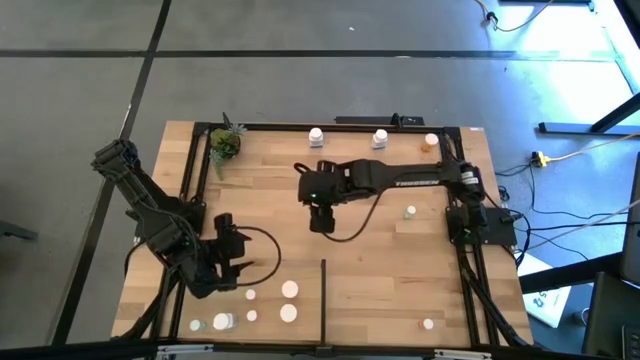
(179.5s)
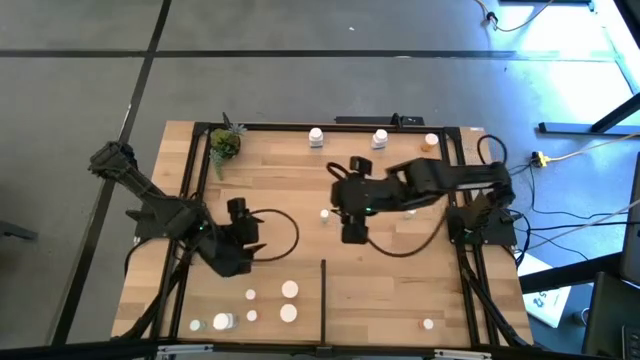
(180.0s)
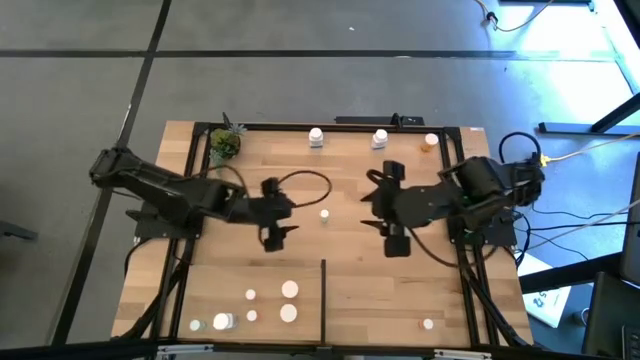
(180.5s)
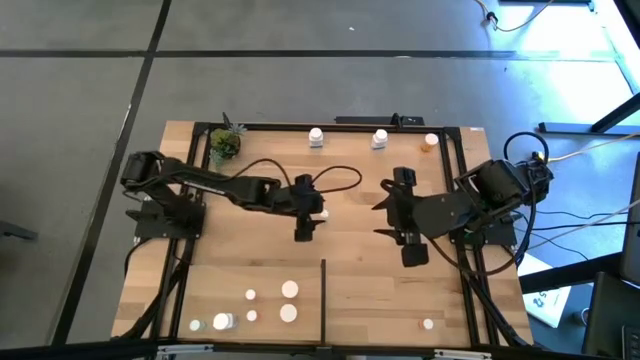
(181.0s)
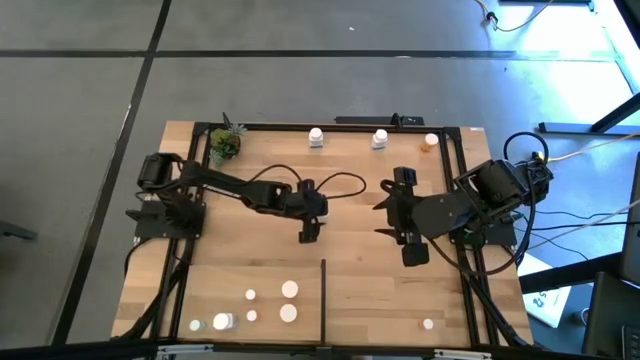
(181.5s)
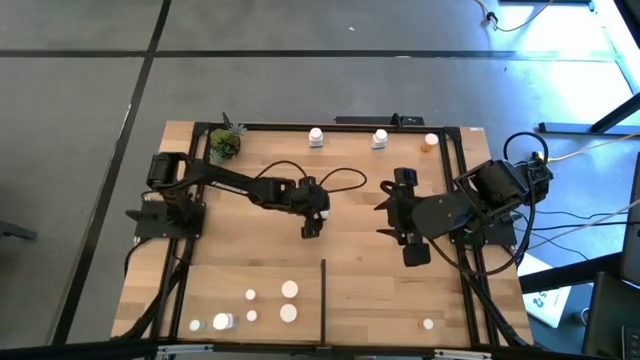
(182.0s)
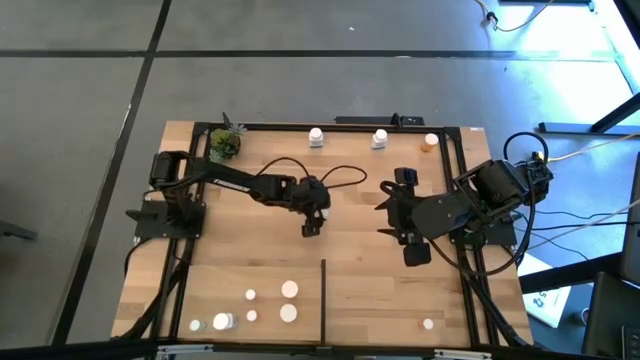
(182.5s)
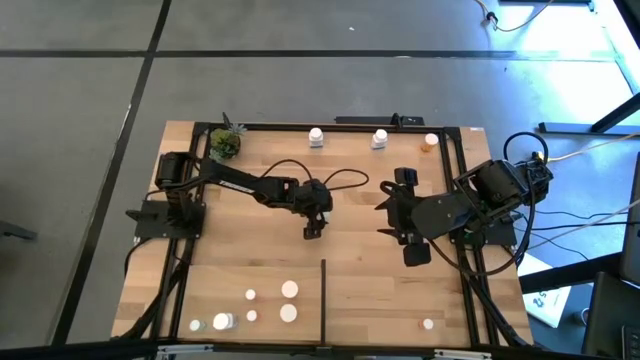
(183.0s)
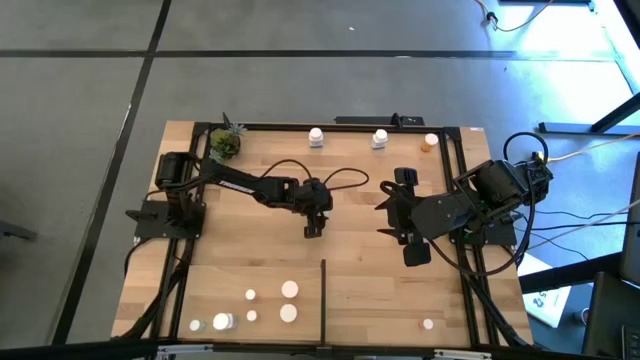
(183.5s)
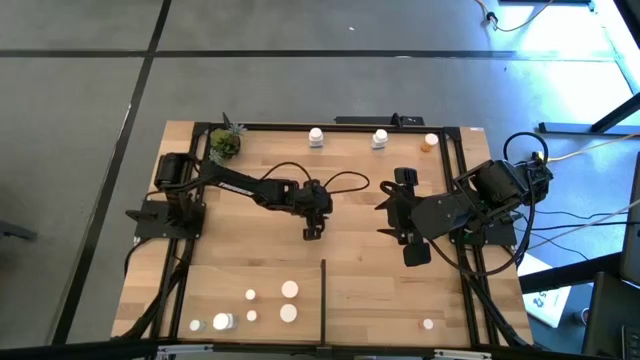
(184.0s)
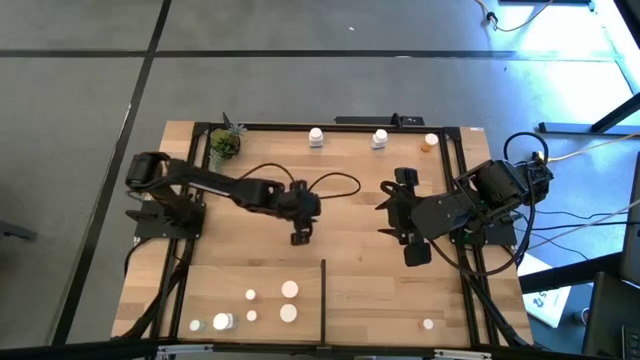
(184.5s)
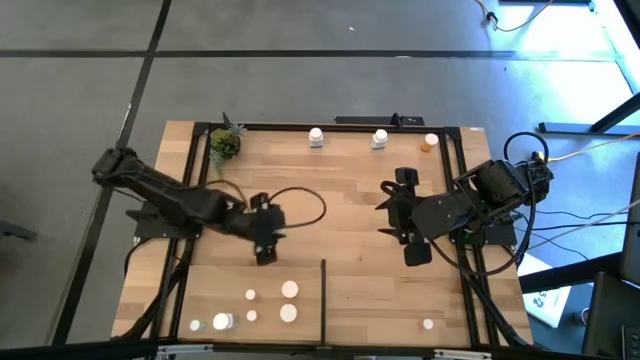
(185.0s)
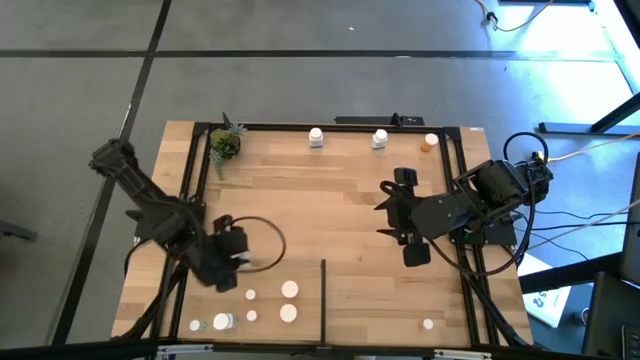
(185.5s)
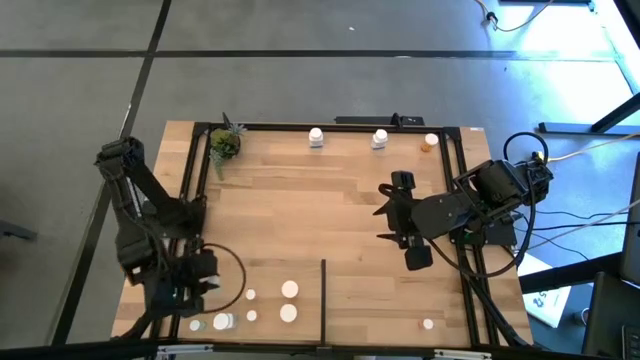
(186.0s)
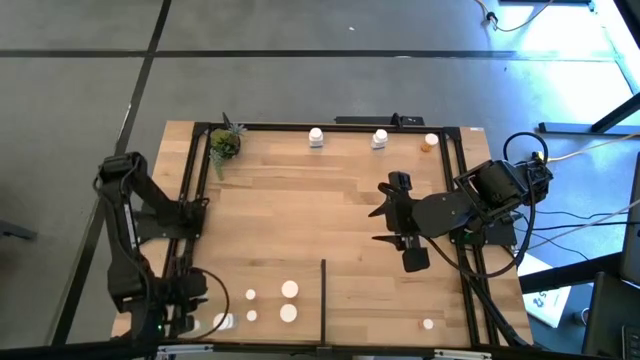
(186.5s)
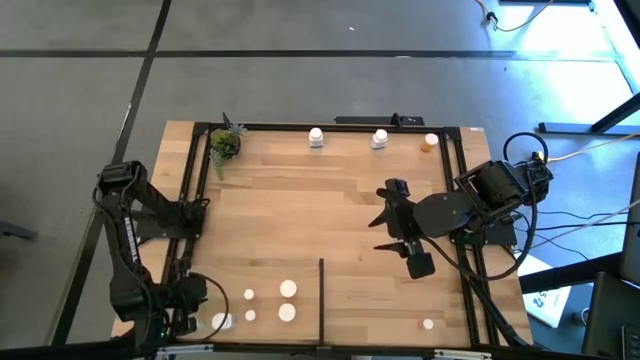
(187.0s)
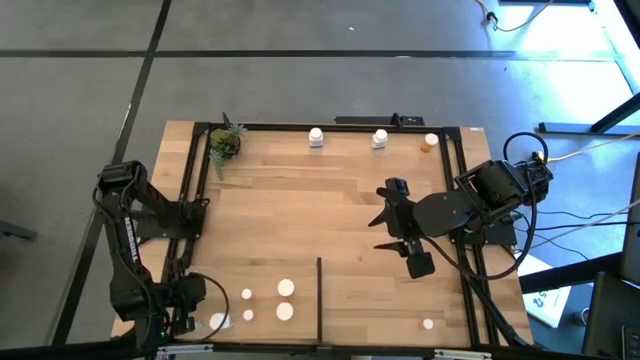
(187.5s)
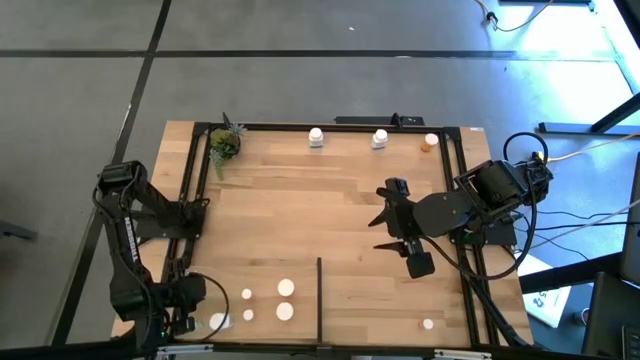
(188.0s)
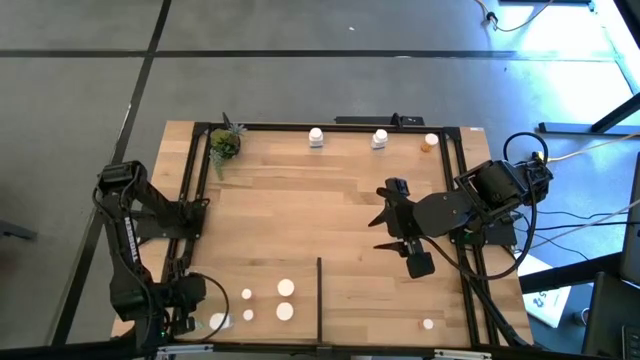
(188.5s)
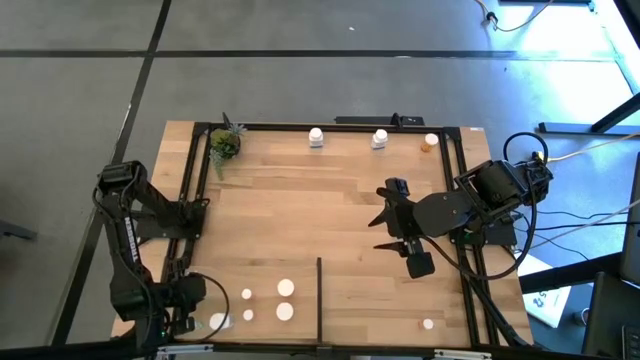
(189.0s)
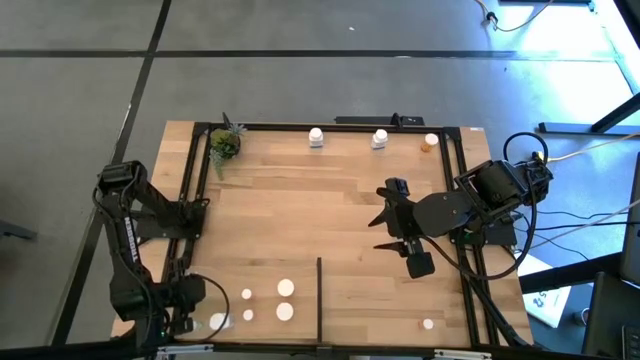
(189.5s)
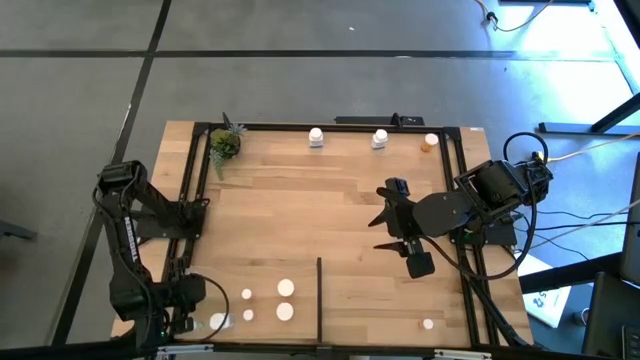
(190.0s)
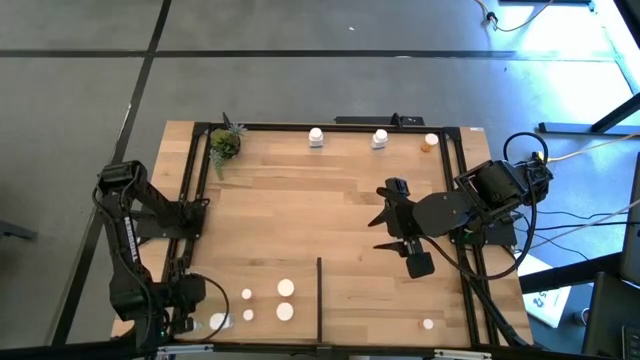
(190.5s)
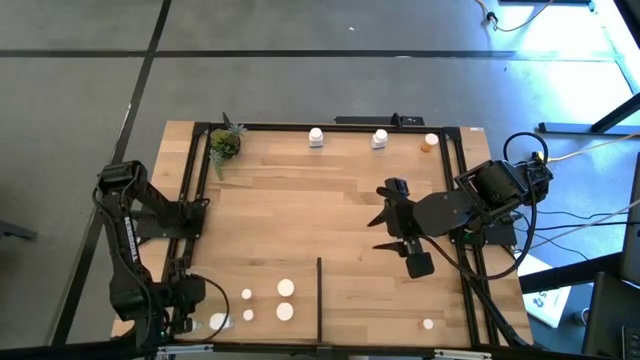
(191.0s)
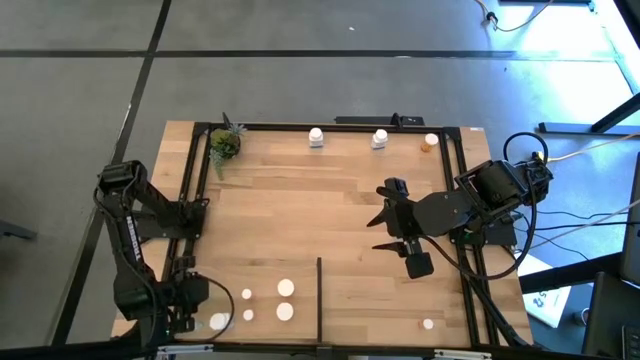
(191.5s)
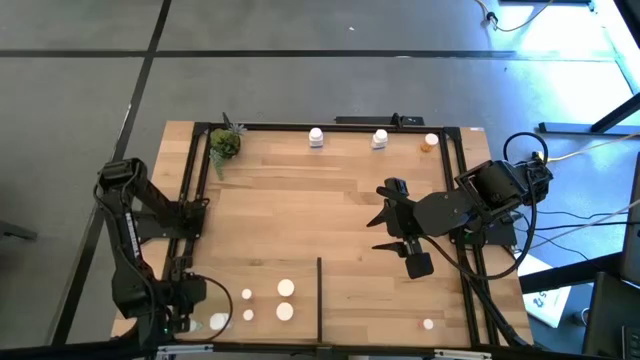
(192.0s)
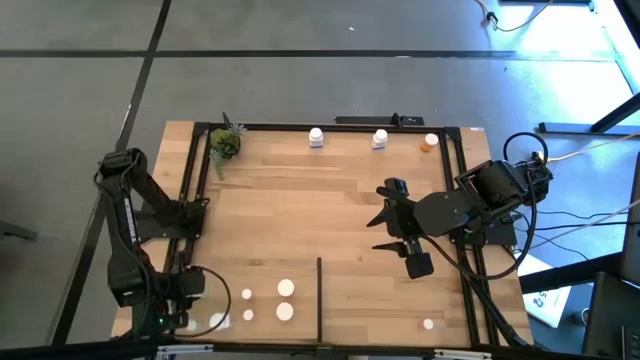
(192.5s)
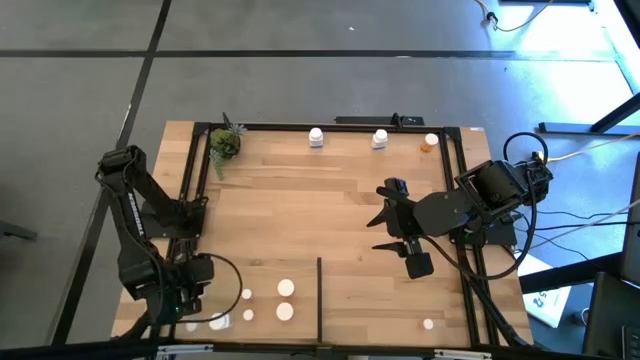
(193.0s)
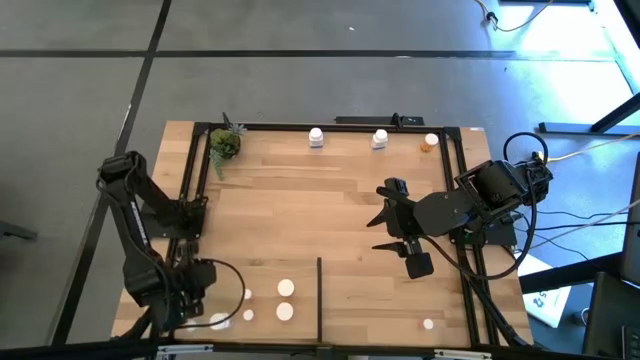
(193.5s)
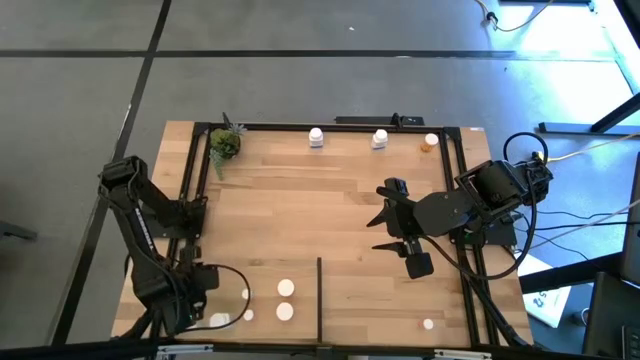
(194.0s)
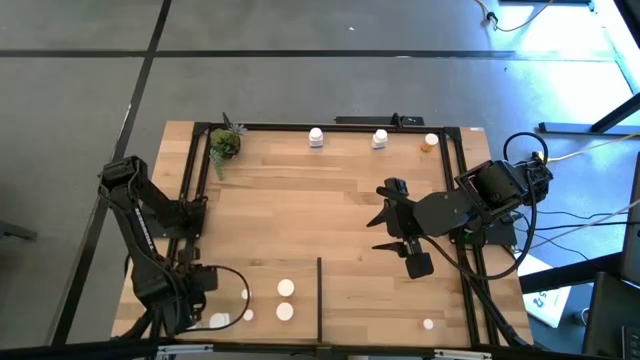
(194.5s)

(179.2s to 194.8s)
Task: Pick and place medicine bottles onto shelf by color
Put the bottom green pill bottle on the shelf aligned with the other green pill bottle

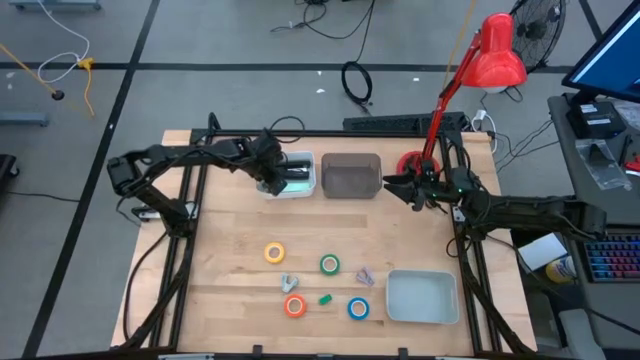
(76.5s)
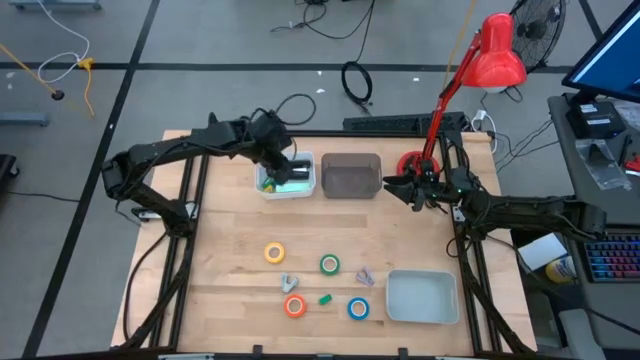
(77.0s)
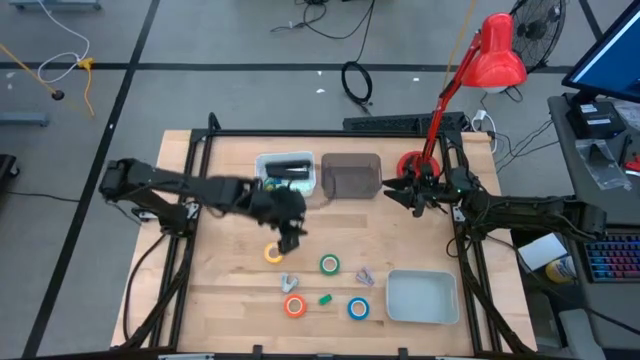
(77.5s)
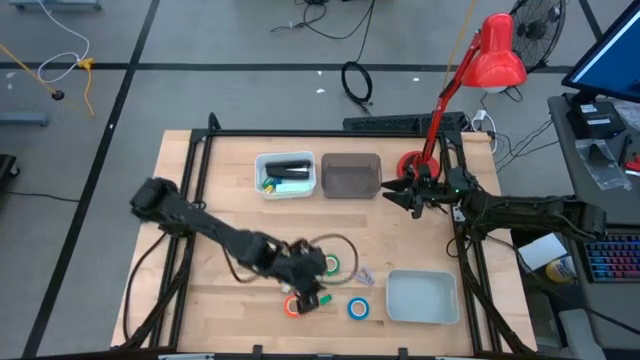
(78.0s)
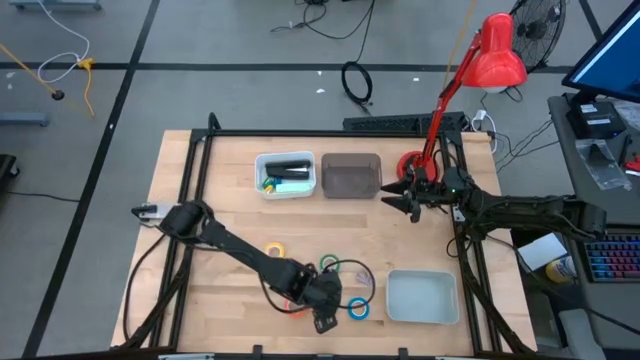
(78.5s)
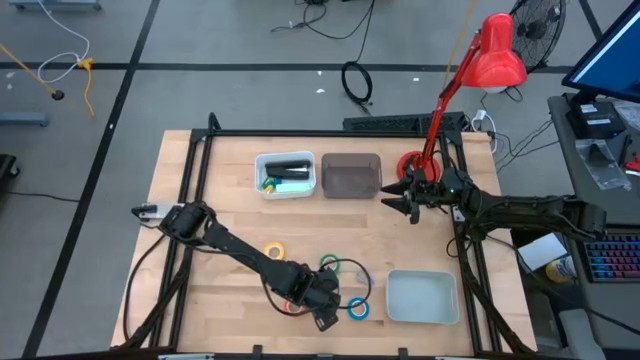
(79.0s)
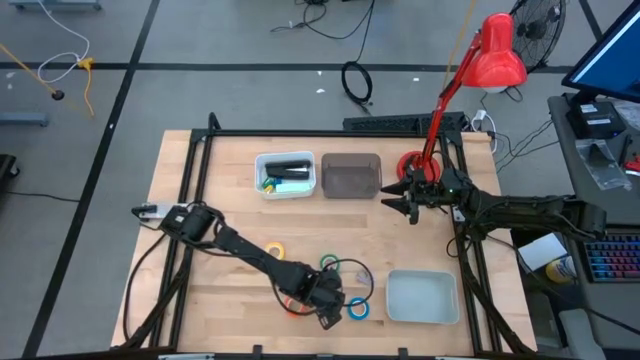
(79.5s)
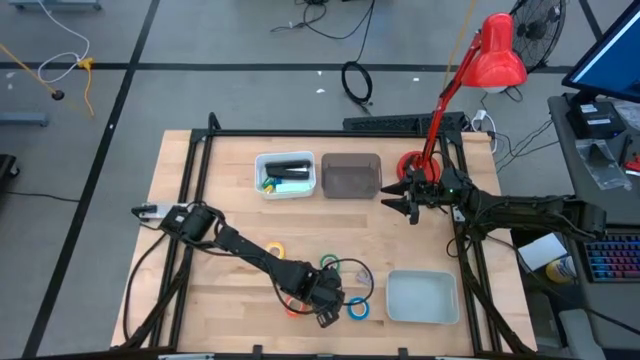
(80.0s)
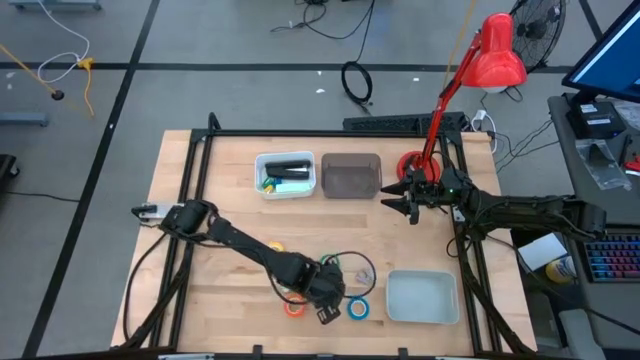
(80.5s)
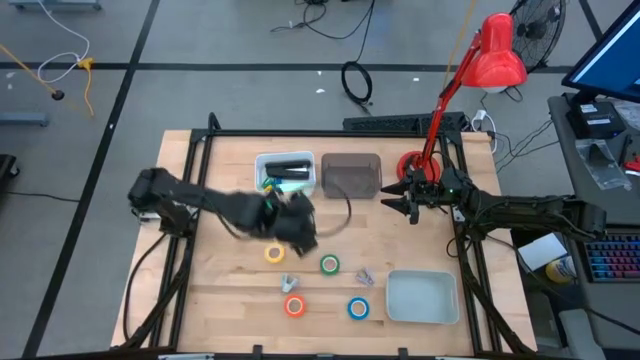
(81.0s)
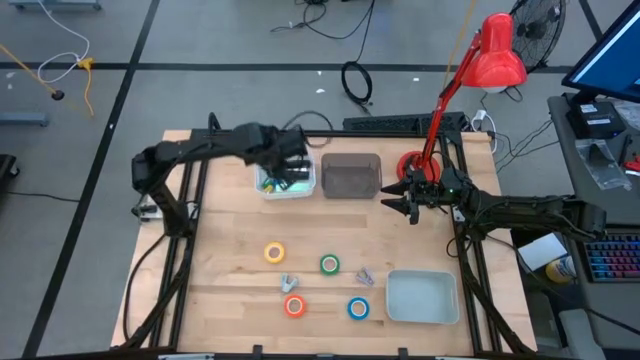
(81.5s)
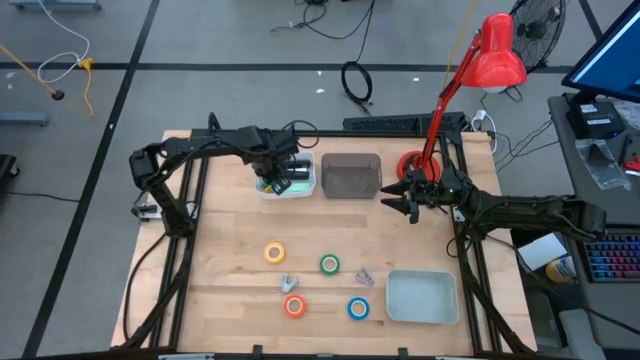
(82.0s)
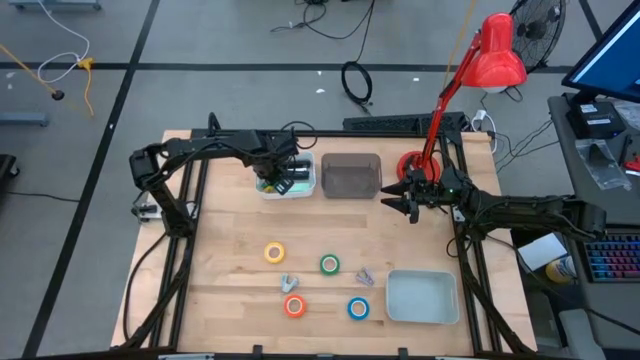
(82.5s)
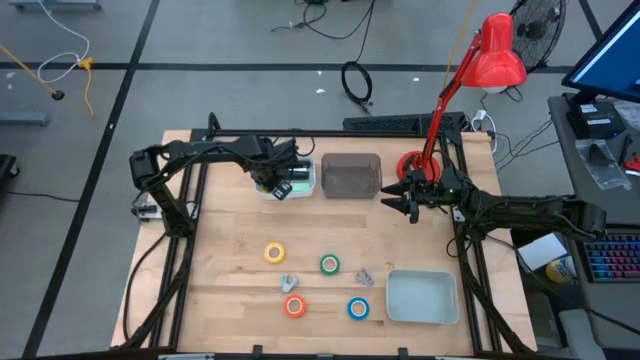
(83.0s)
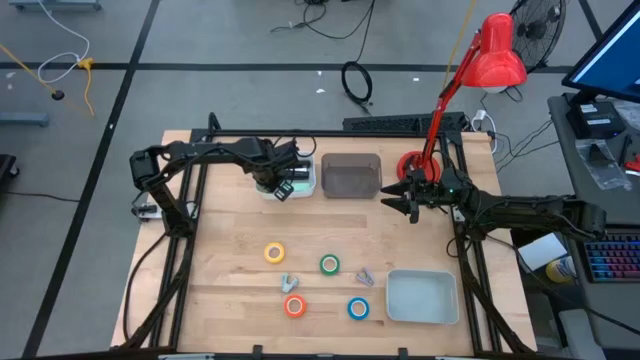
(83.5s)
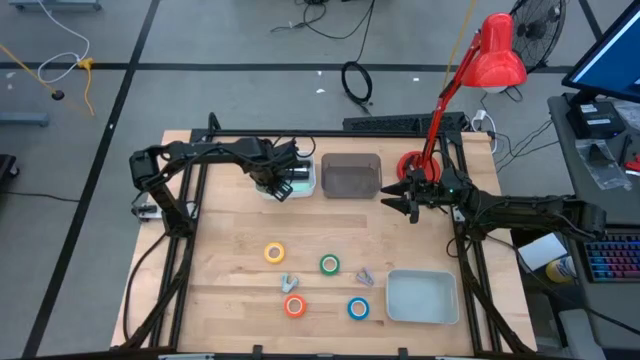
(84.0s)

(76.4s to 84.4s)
Task: Pick and place Stapler, Stapler remover, tape
Put the small green stapler into the white bin
